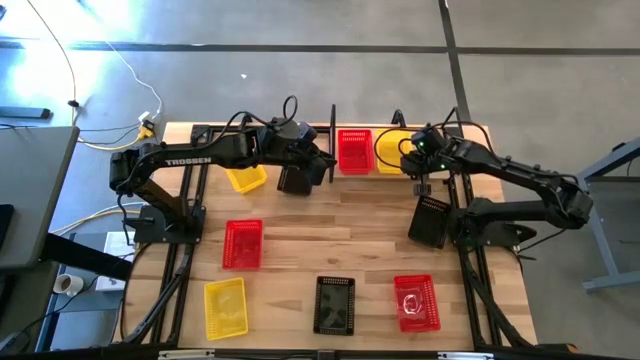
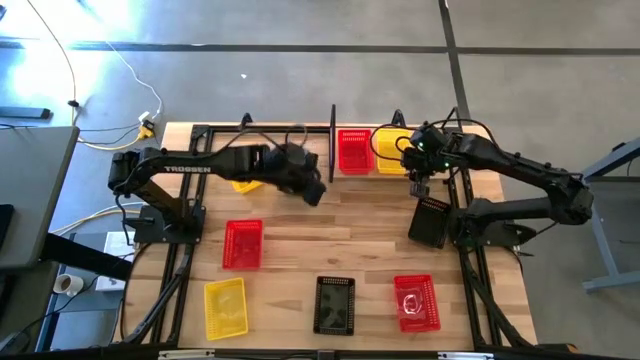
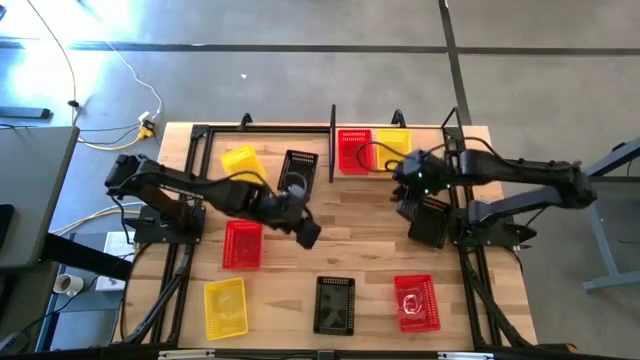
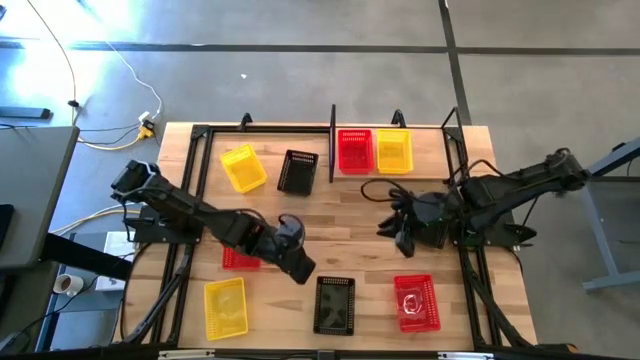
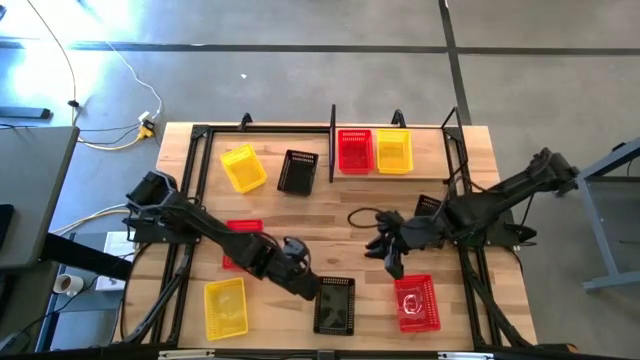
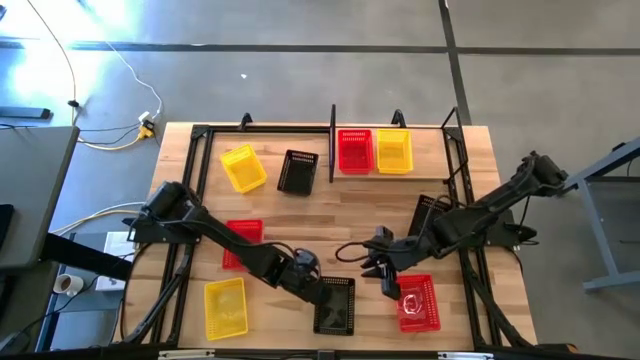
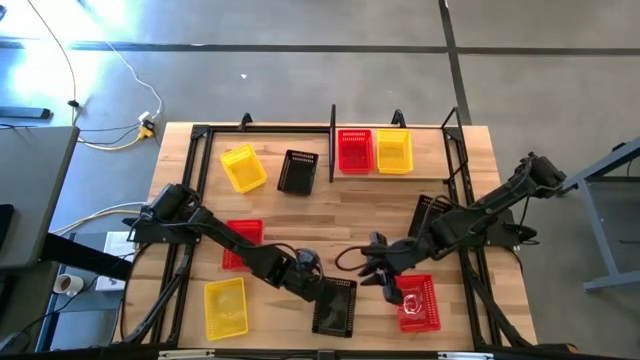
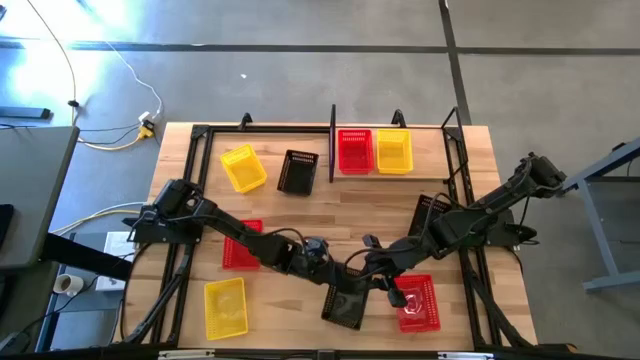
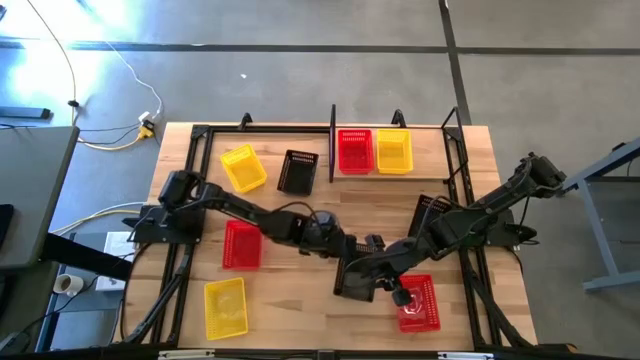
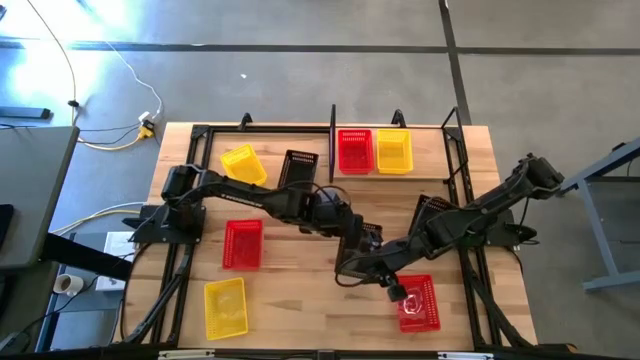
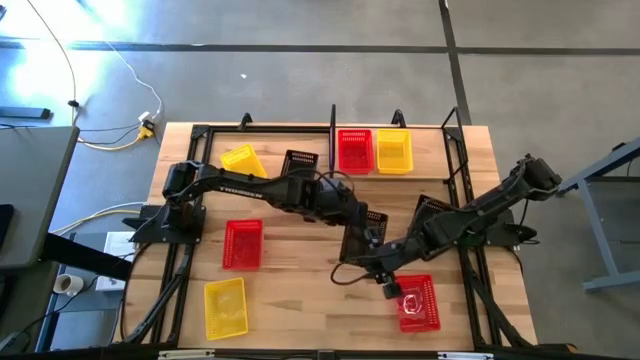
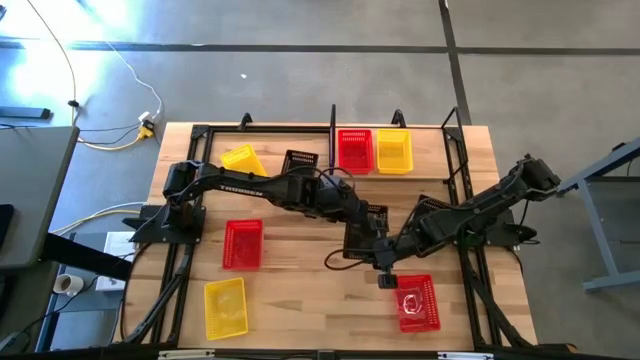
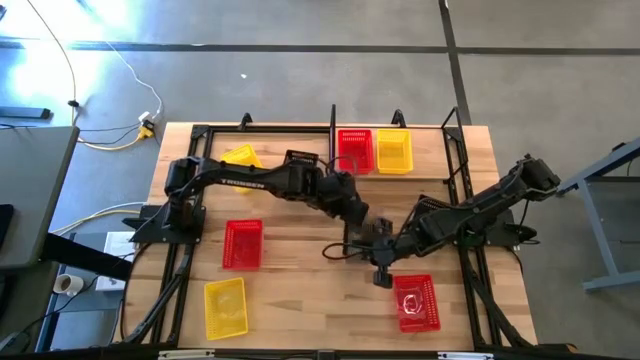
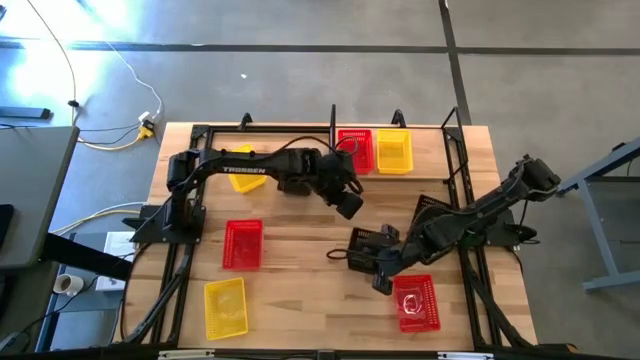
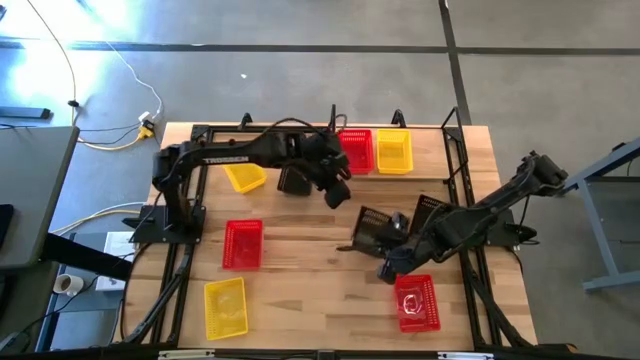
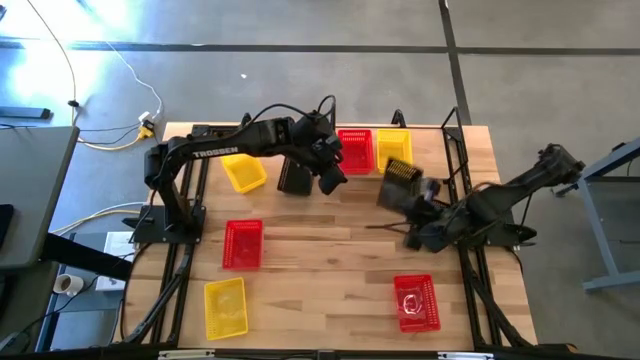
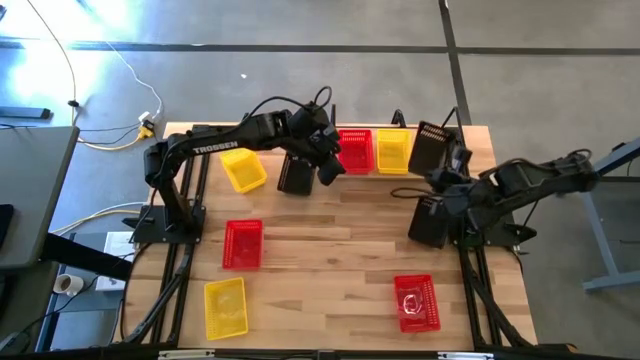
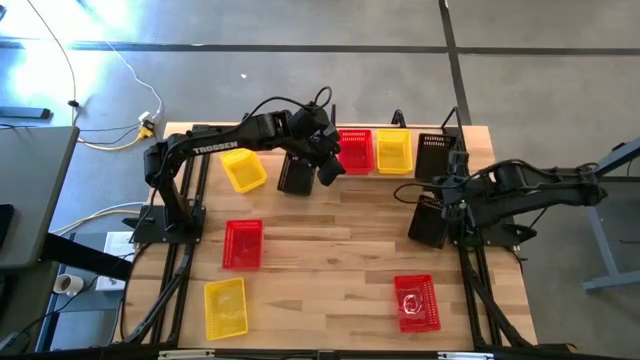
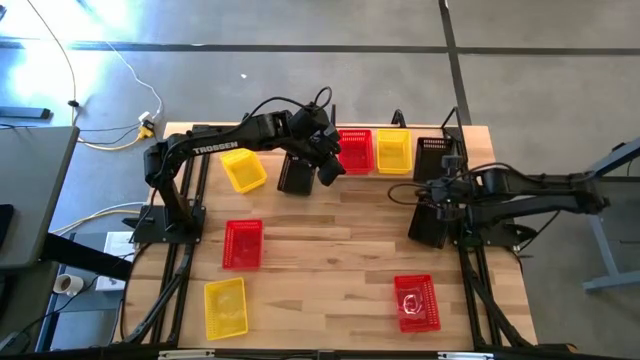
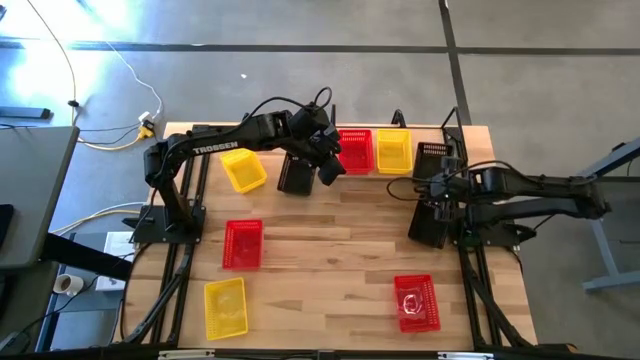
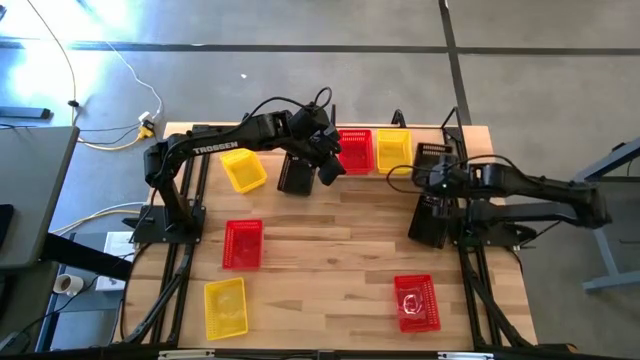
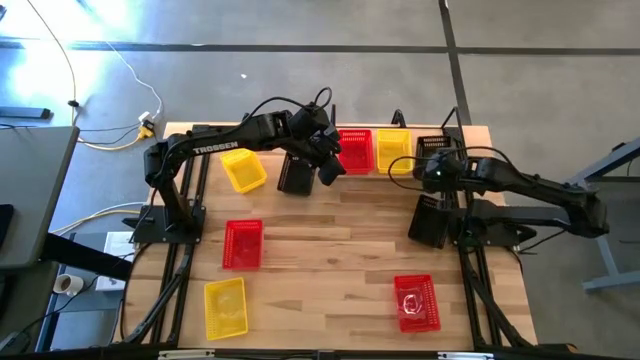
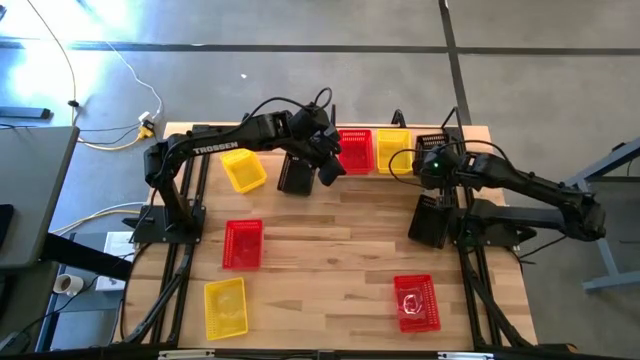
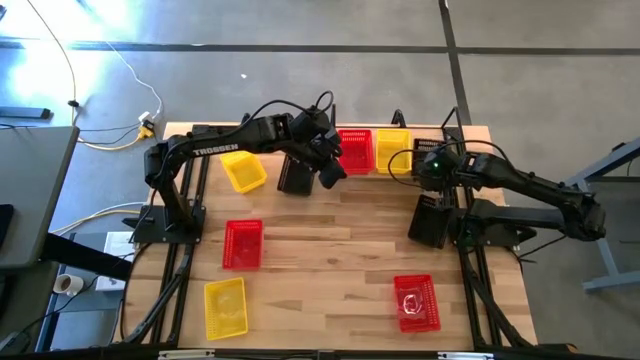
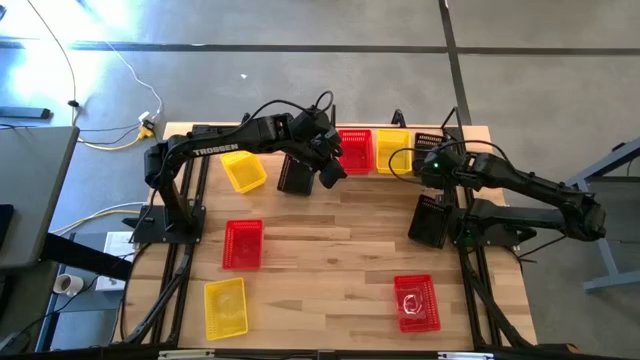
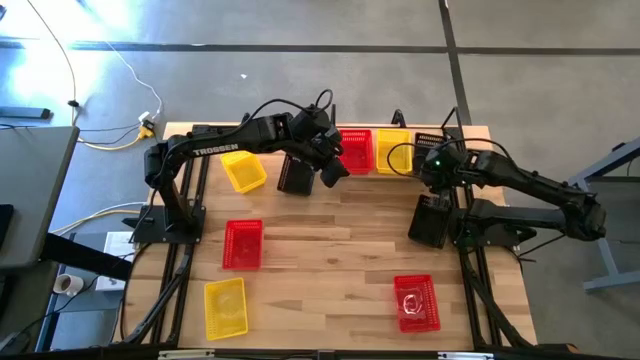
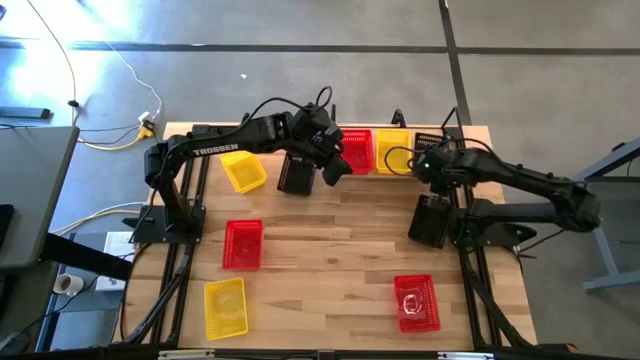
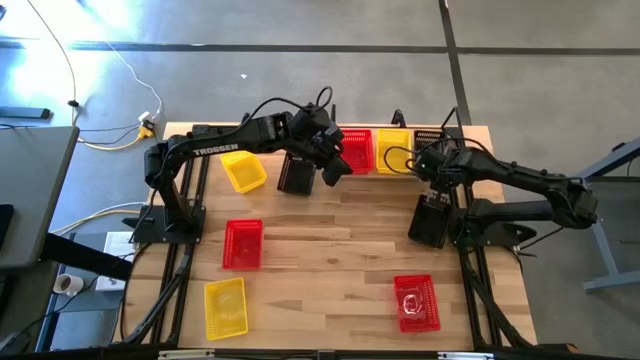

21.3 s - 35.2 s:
Task: Stack baskets on shelf by color
Put the bottom black bin on the shelf

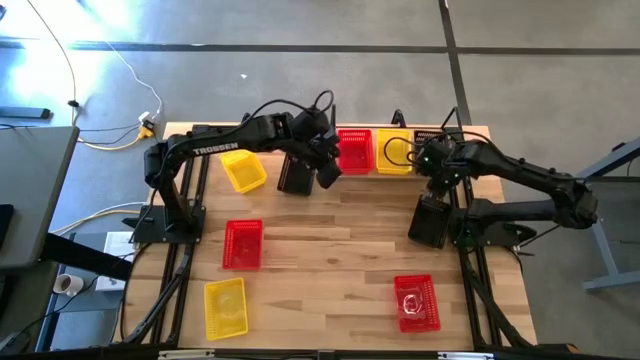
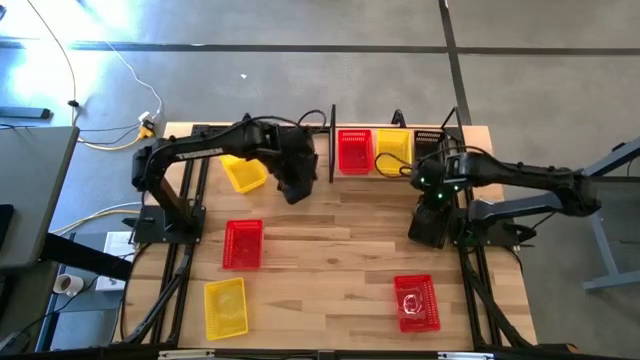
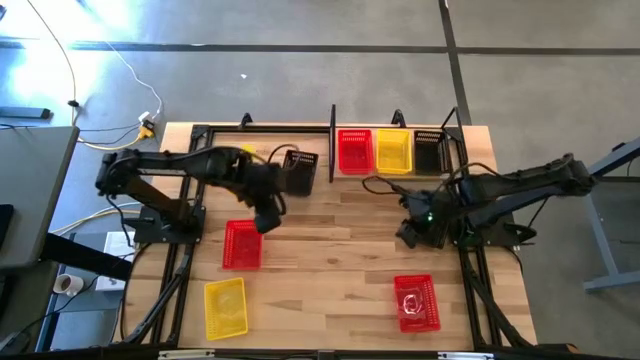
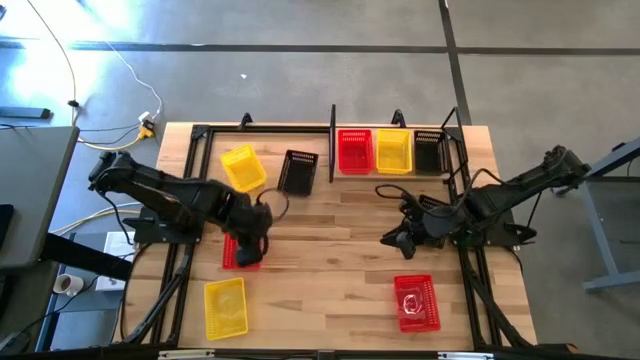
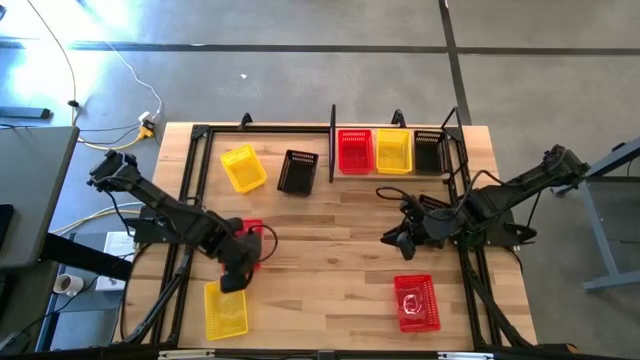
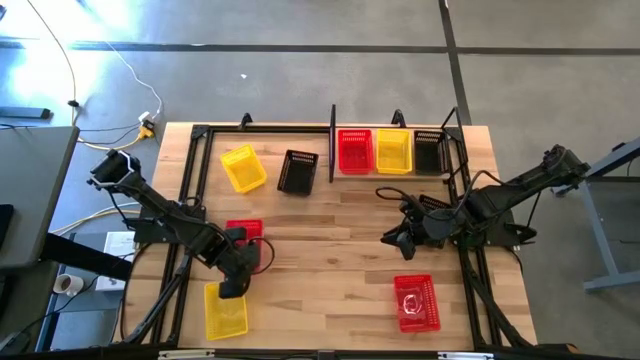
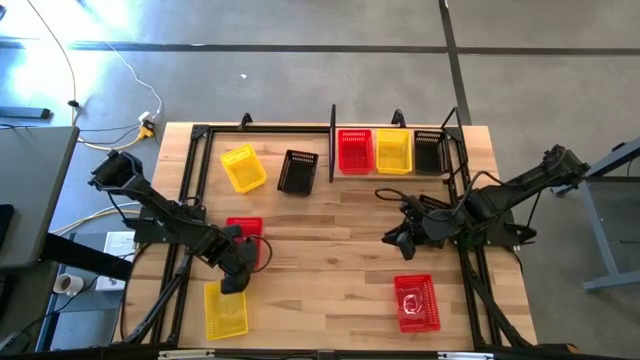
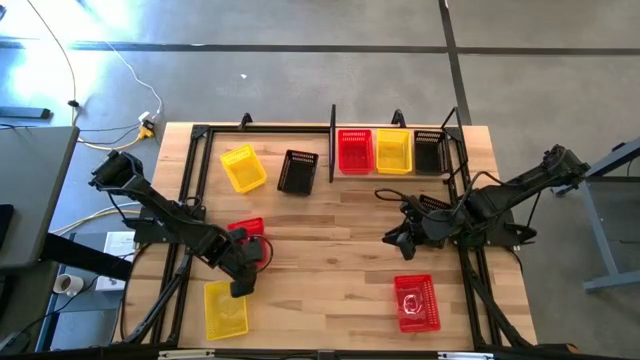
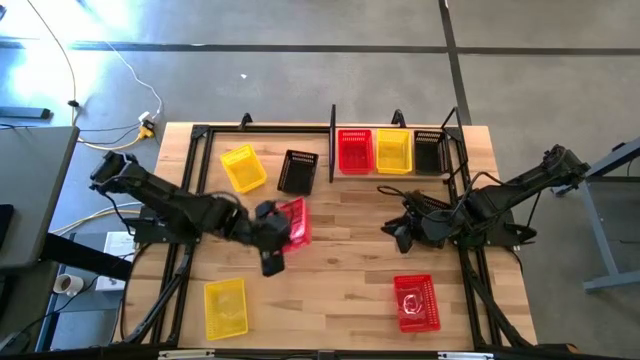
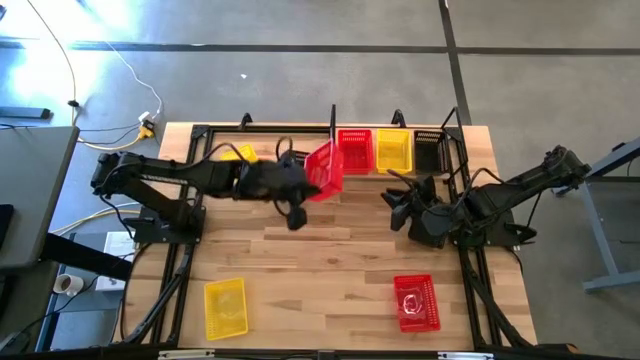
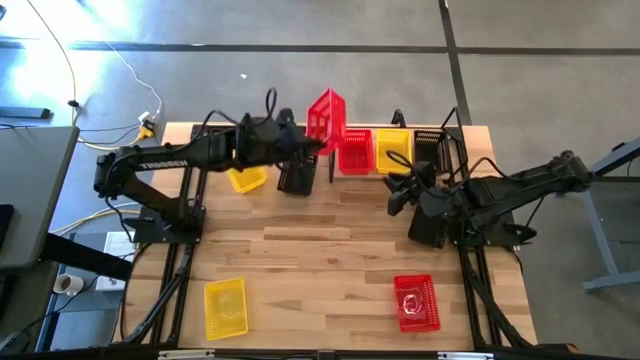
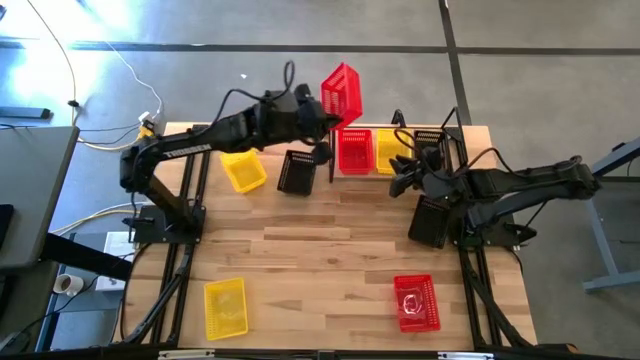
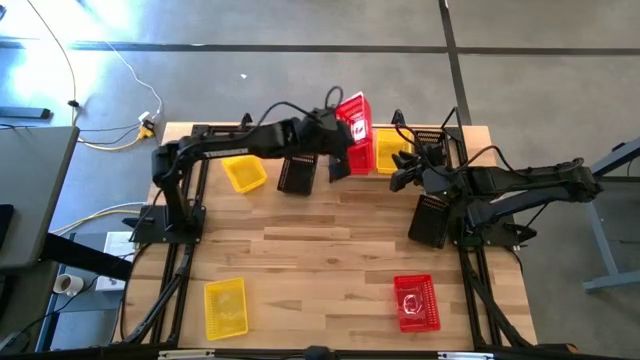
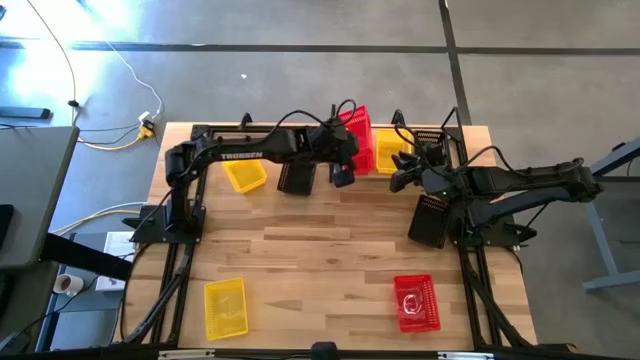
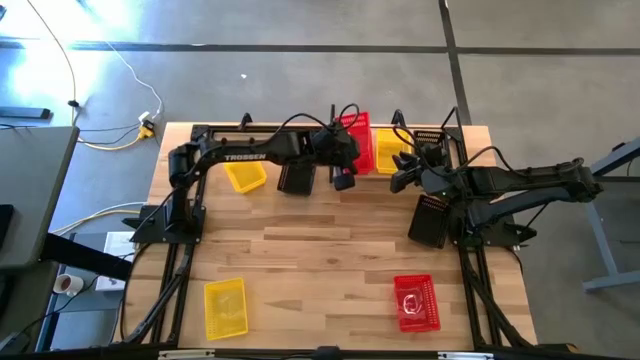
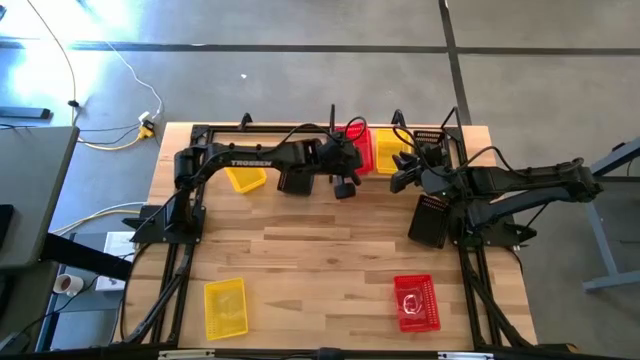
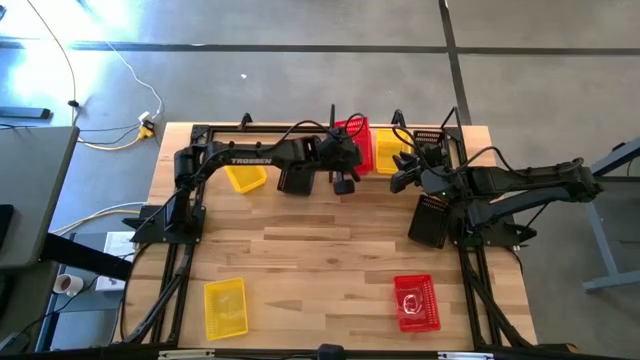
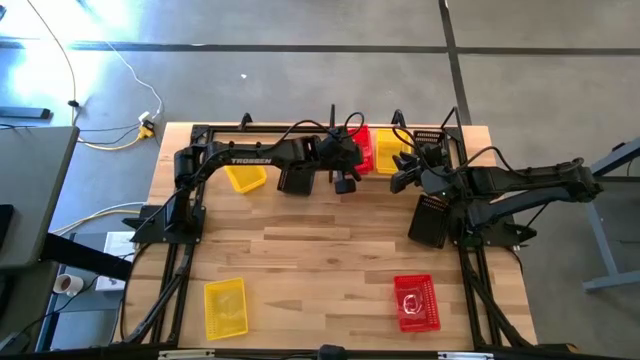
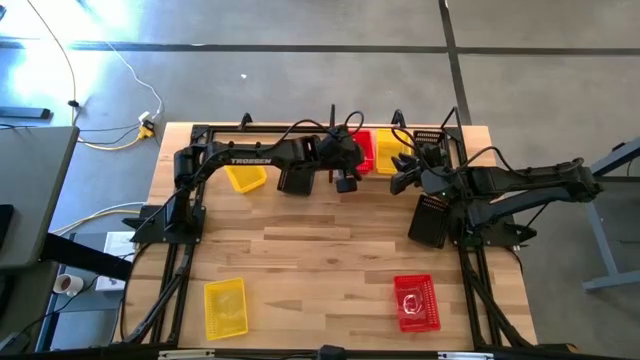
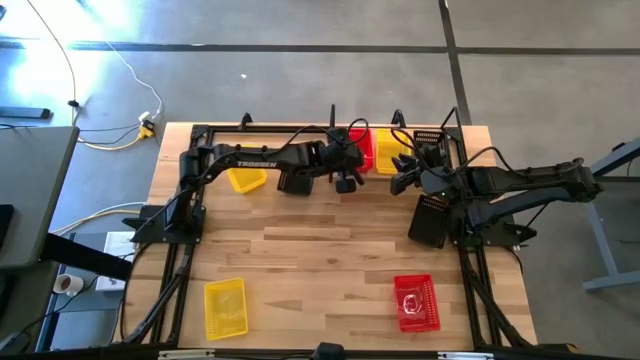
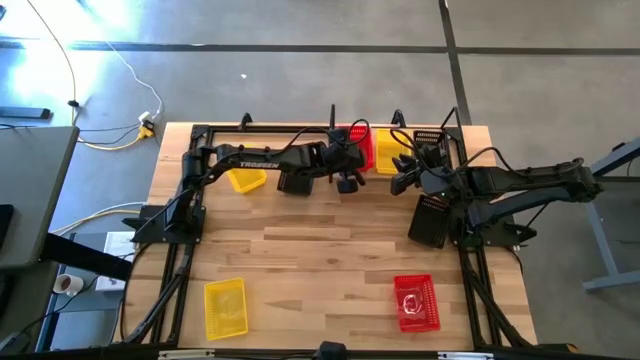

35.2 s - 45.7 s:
Stack the left red bin on top of the red bin on the shelf
